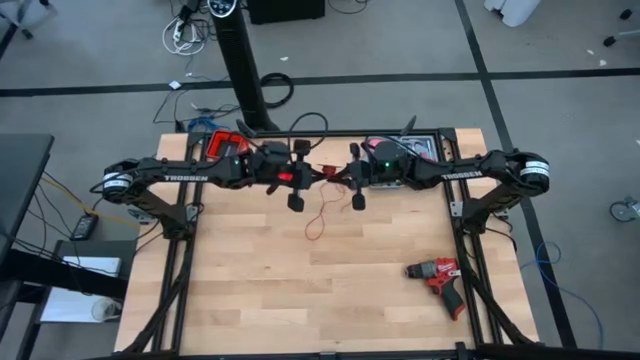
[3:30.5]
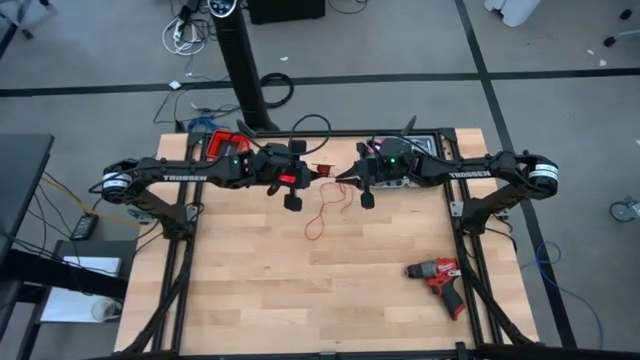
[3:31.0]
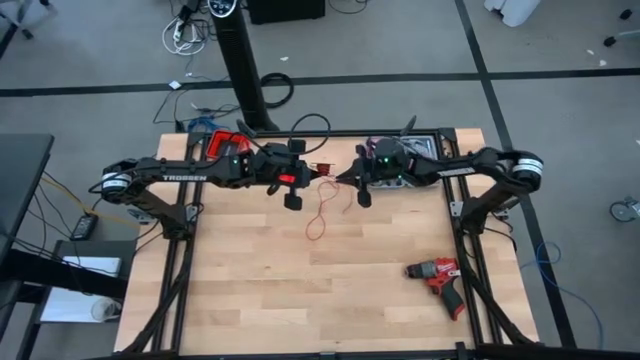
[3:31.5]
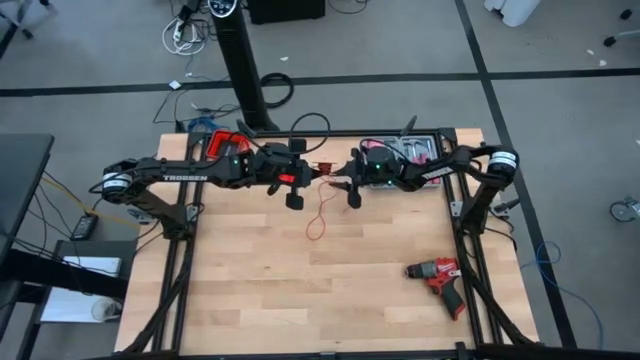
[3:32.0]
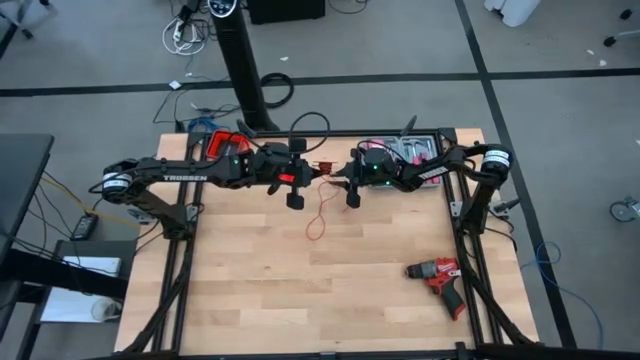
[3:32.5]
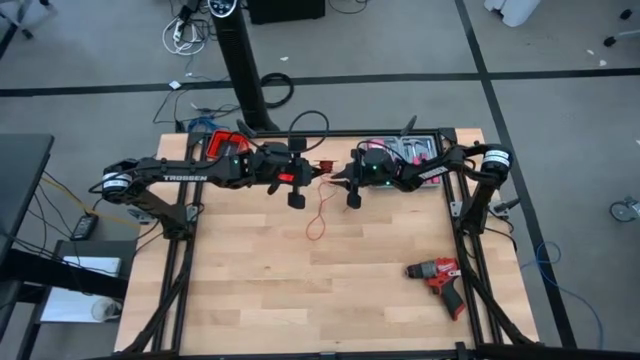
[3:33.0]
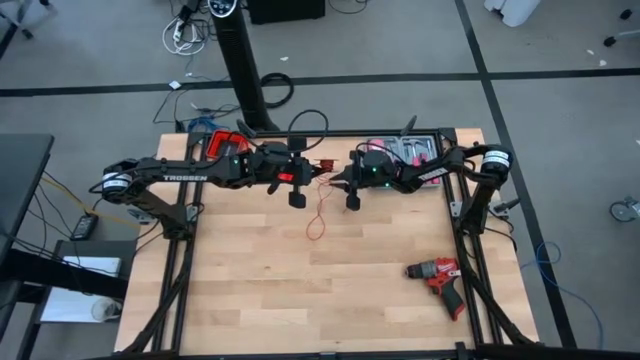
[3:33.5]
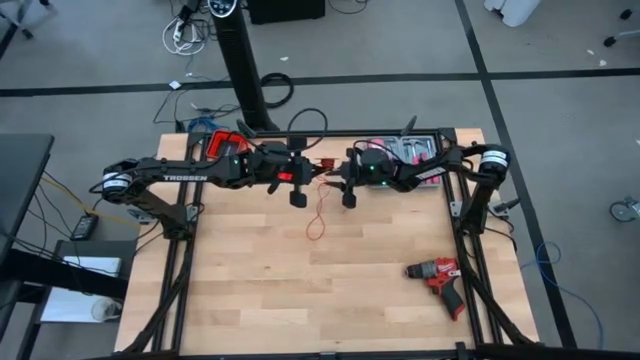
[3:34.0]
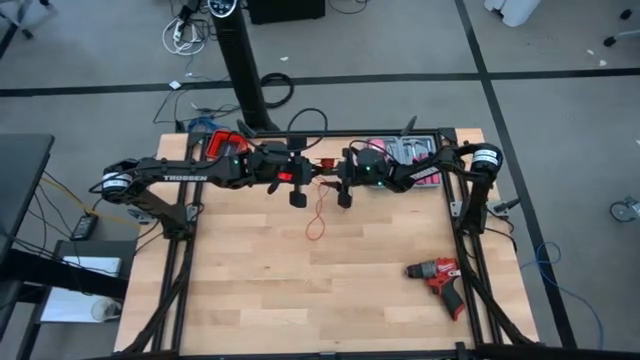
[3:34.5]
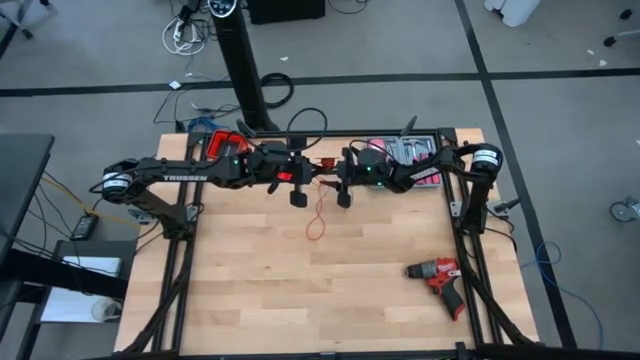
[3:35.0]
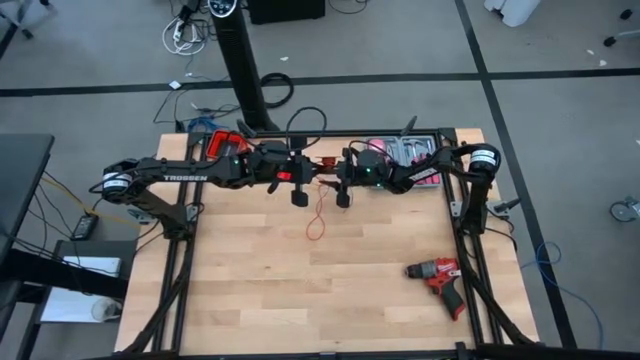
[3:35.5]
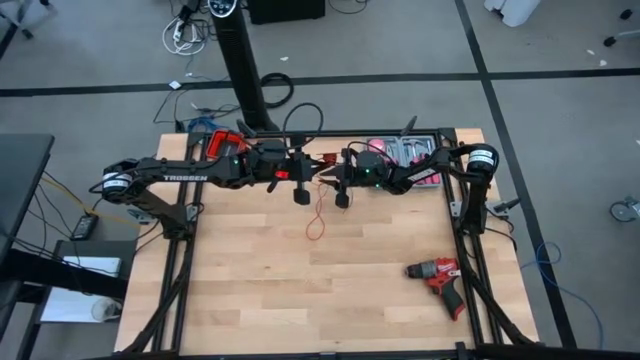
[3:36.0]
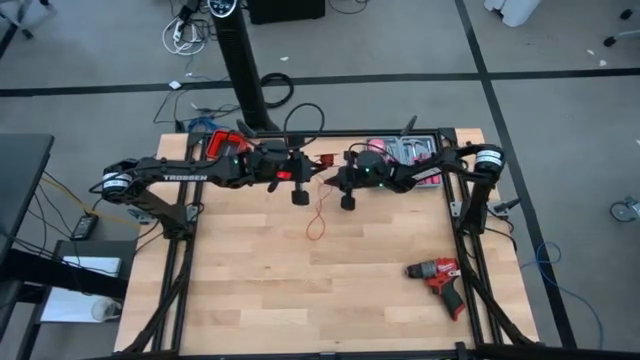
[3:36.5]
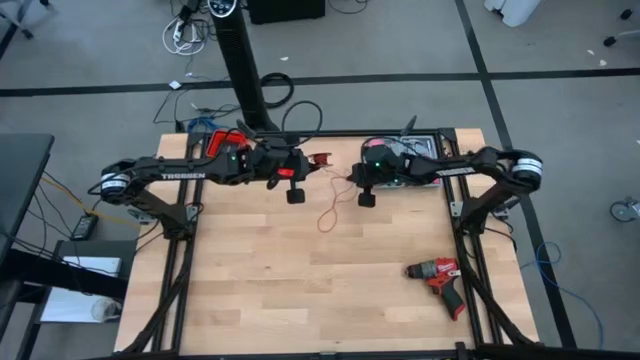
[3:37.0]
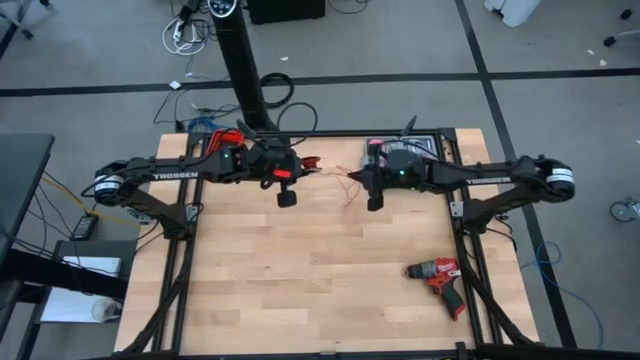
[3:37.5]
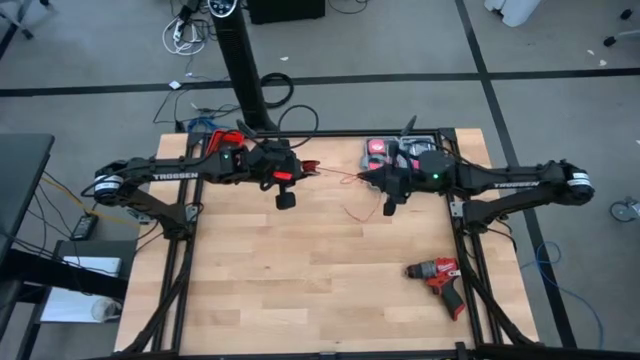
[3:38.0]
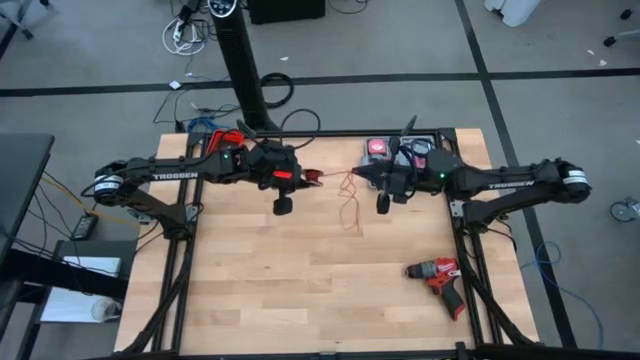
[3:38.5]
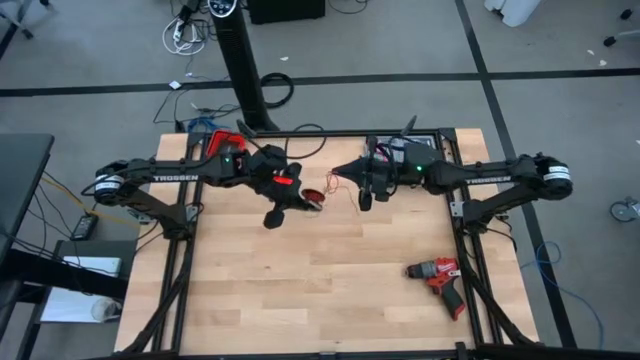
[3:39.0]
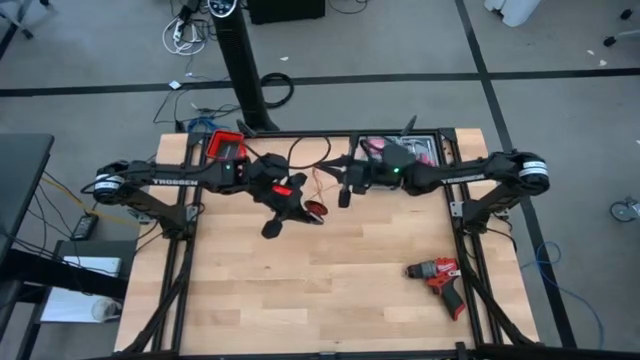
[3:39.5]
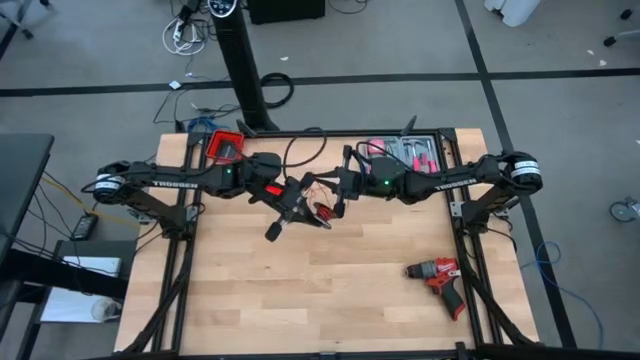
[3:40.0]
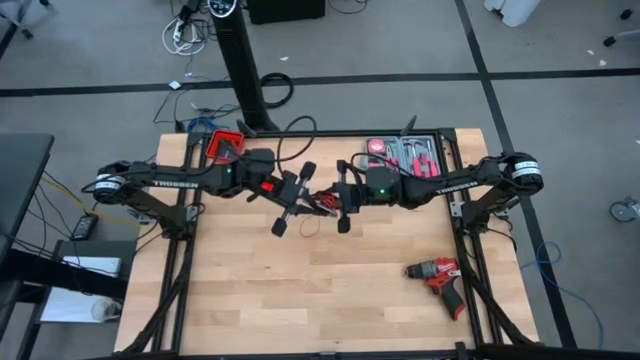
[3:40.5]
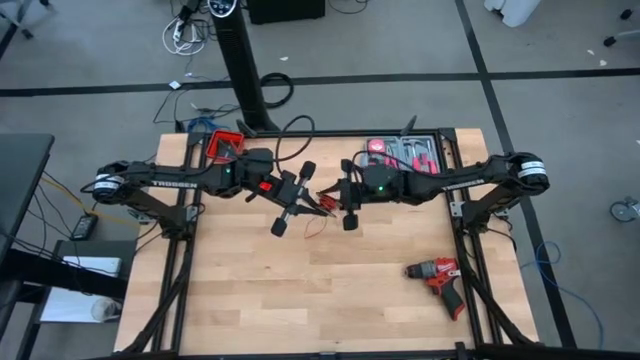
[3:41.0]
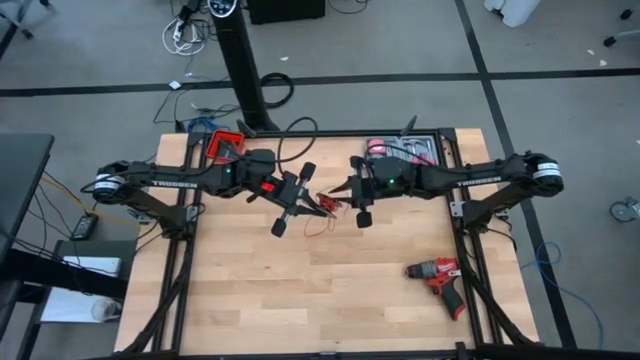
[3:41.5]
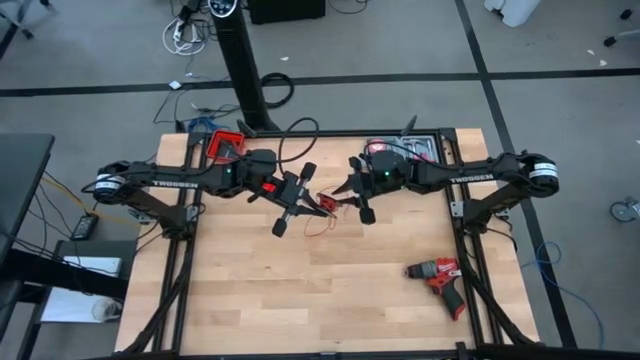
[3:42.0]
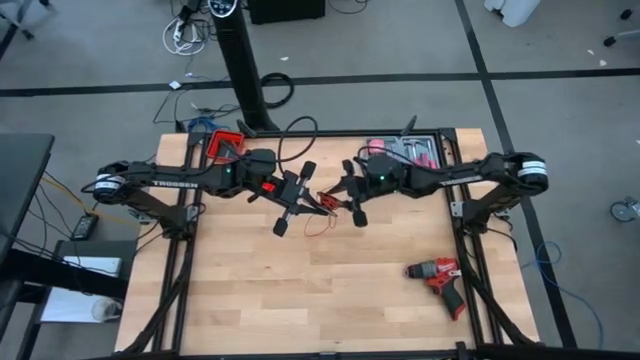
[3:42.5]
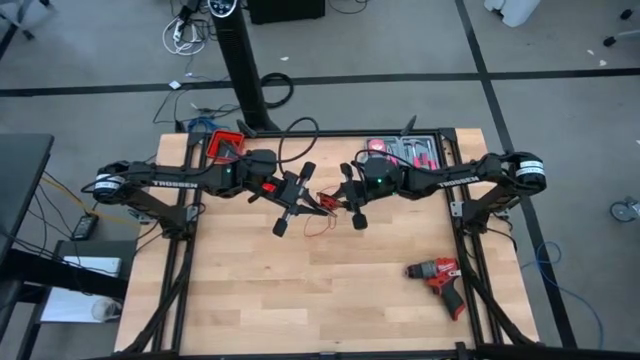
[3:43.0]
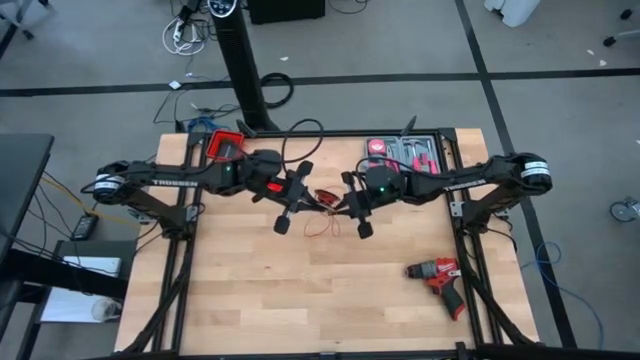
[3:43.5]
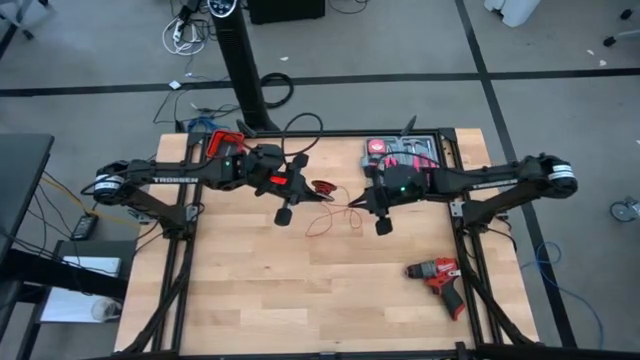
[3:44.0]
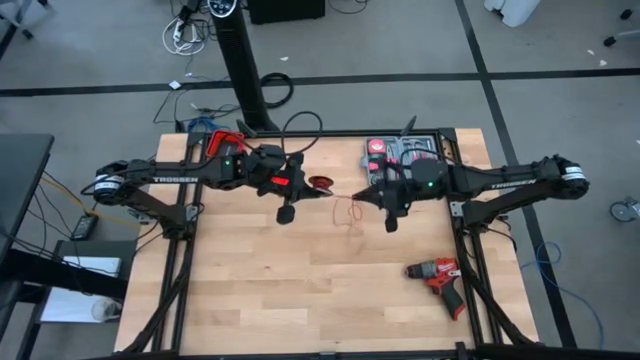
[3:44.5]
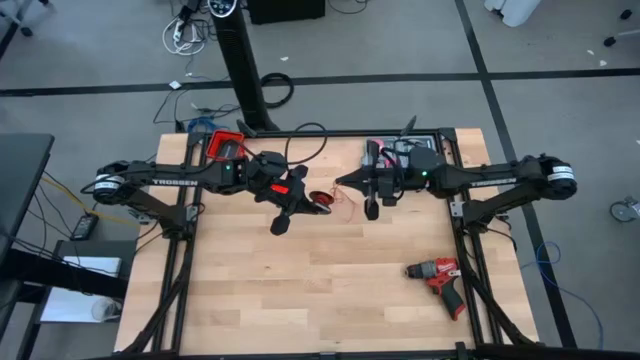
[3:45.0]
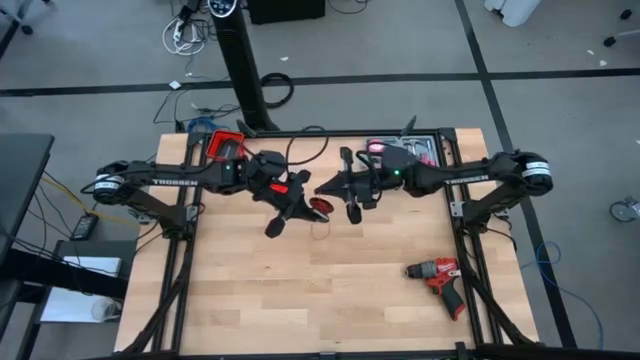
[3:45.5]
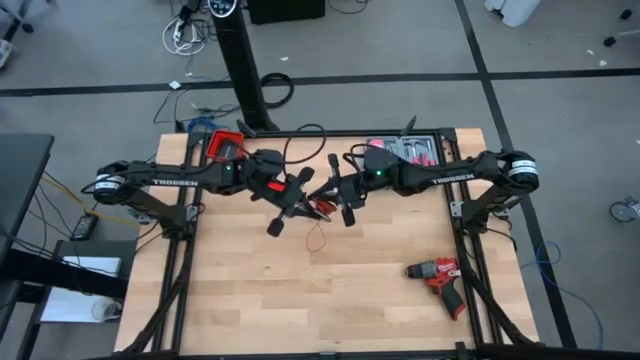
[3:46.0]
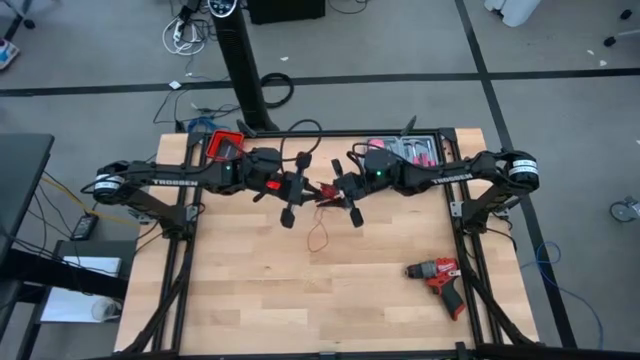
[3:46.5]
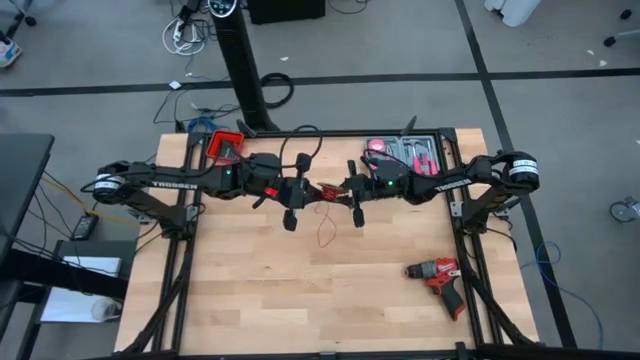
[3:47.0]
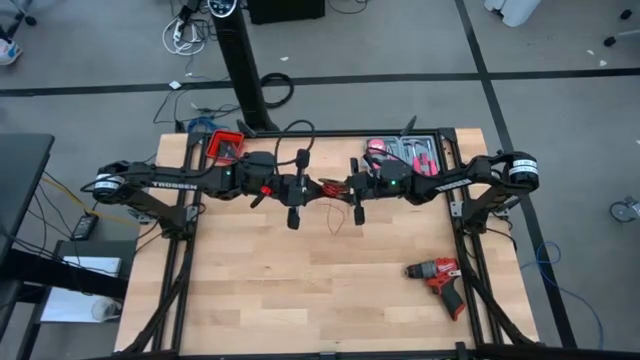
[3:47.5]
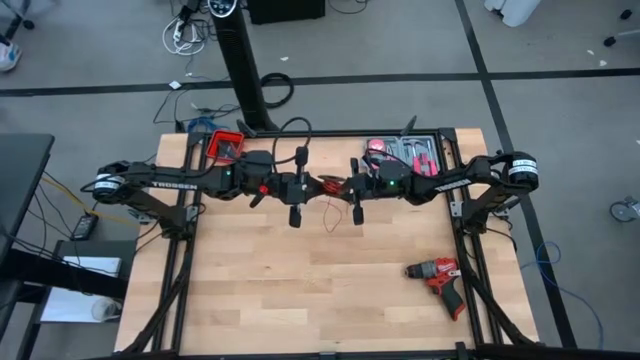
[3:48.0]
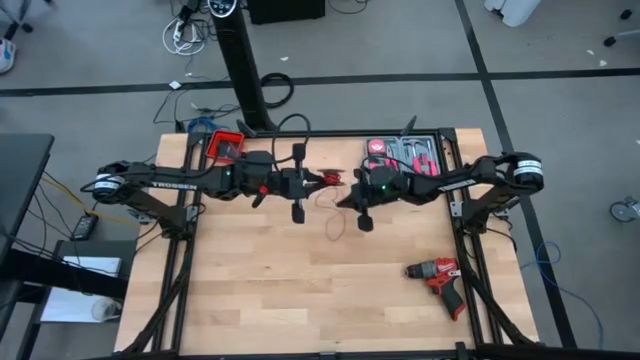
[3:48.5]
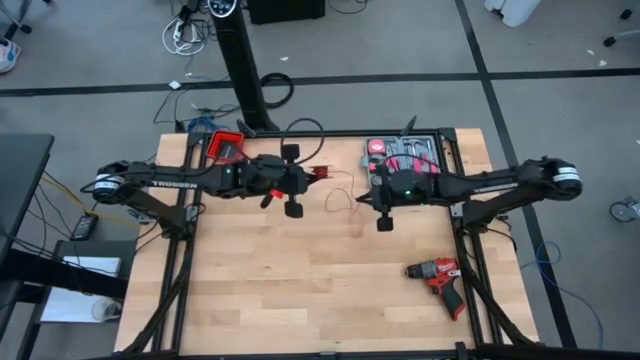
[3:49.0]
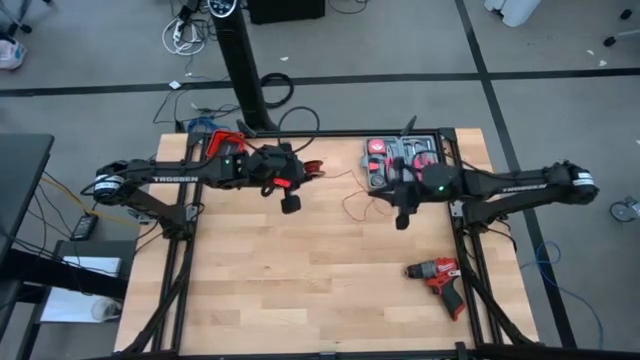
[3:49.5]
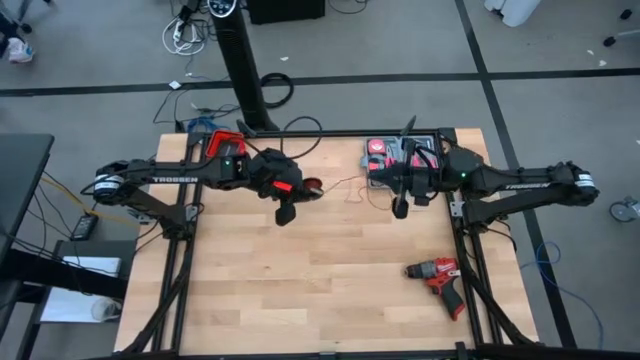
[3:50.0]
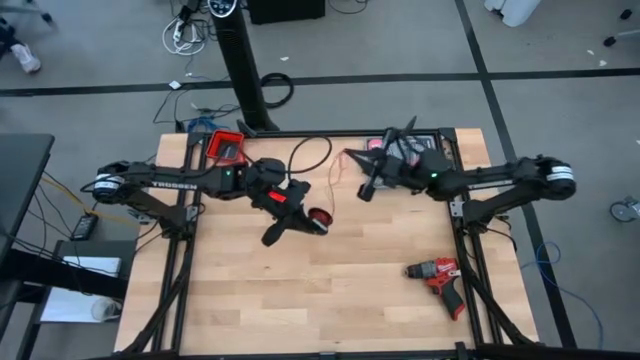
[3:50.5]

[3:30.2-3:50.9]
Task: Coil cords
Coil the red wire onto the black spool
